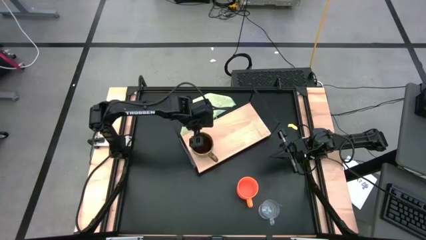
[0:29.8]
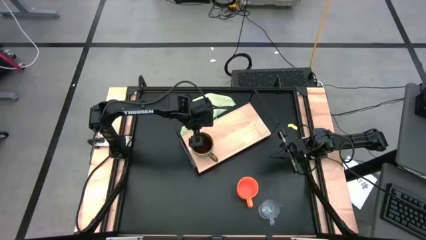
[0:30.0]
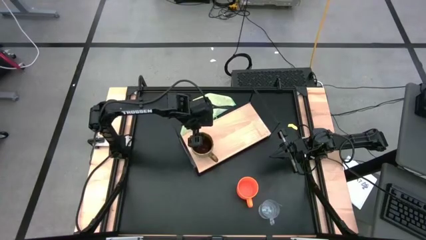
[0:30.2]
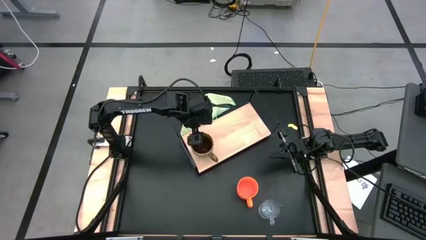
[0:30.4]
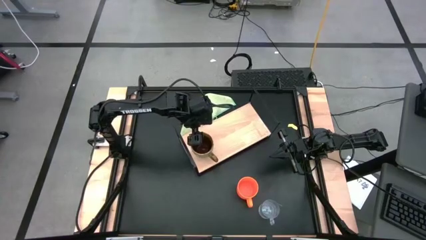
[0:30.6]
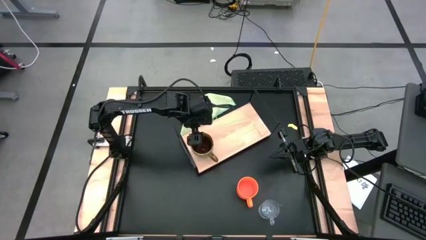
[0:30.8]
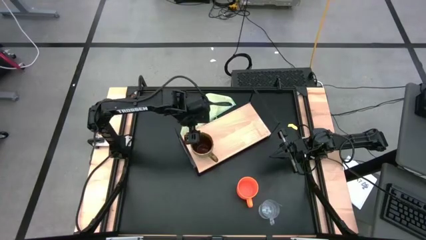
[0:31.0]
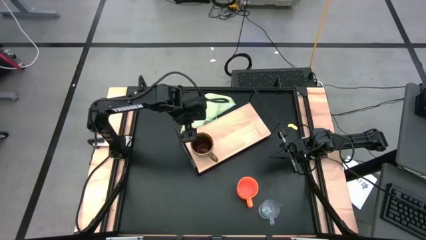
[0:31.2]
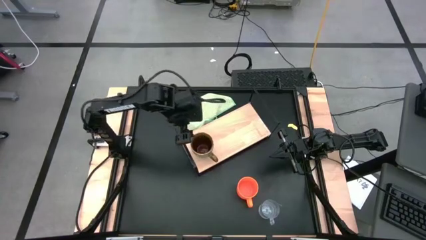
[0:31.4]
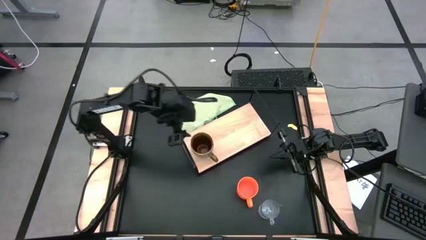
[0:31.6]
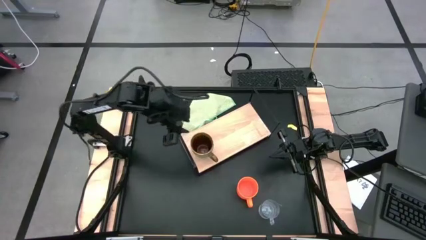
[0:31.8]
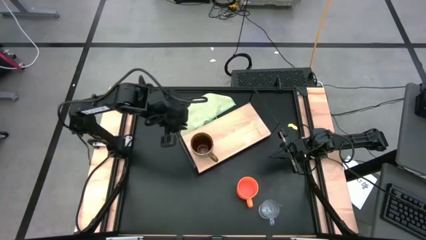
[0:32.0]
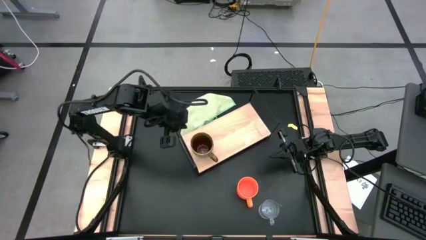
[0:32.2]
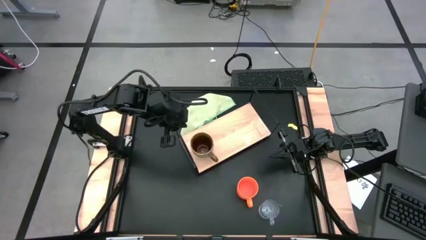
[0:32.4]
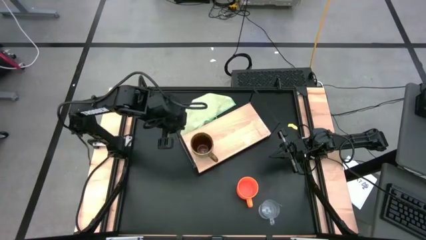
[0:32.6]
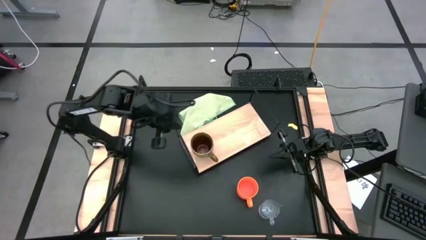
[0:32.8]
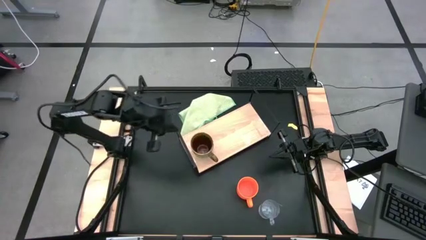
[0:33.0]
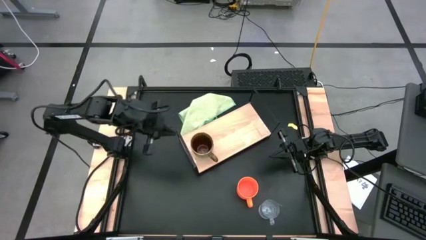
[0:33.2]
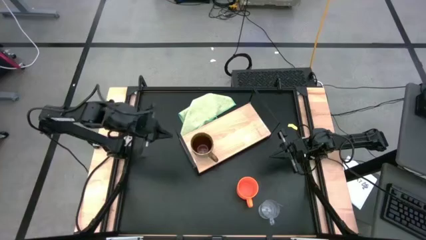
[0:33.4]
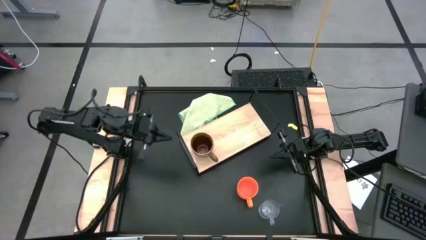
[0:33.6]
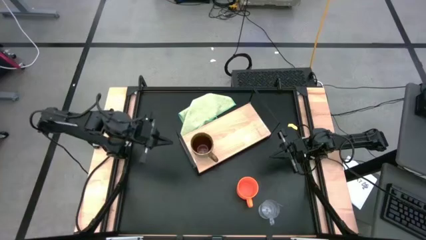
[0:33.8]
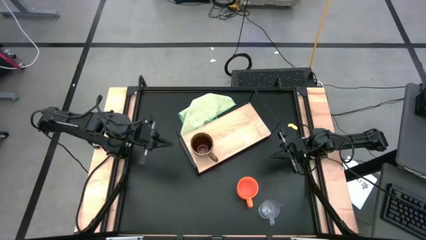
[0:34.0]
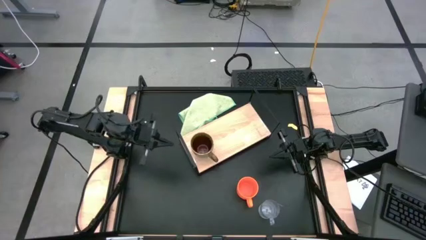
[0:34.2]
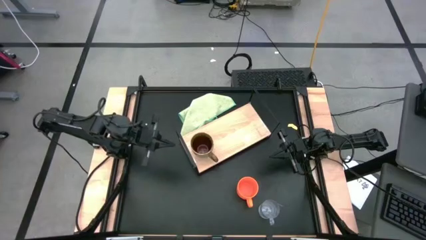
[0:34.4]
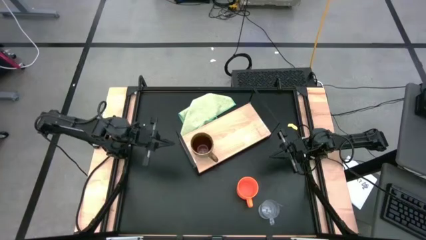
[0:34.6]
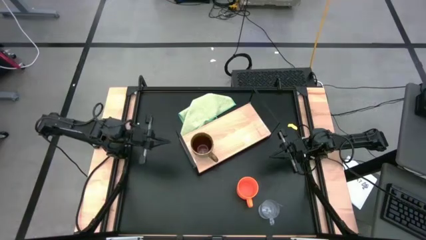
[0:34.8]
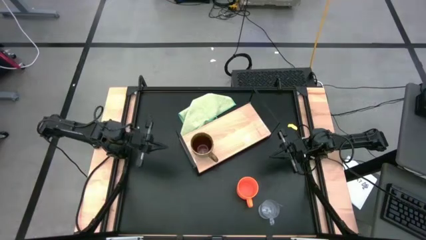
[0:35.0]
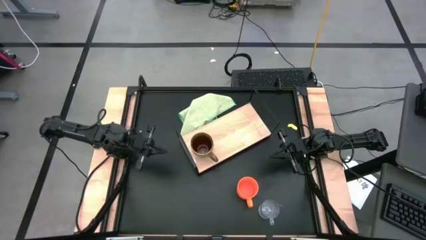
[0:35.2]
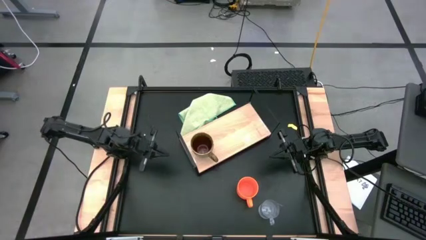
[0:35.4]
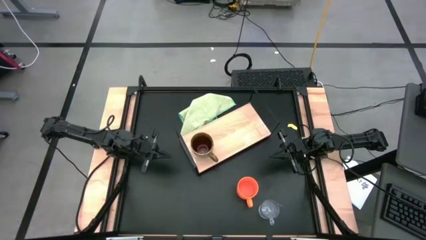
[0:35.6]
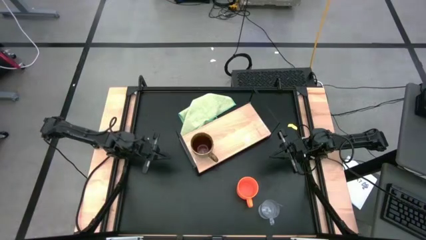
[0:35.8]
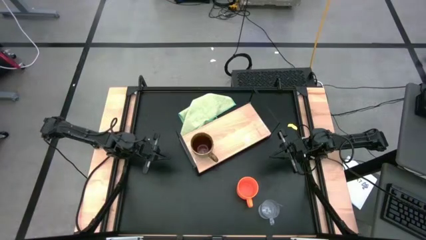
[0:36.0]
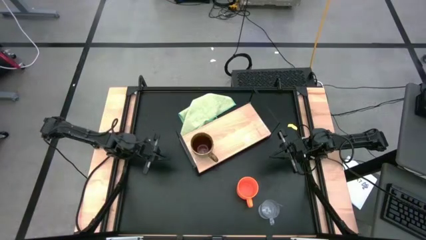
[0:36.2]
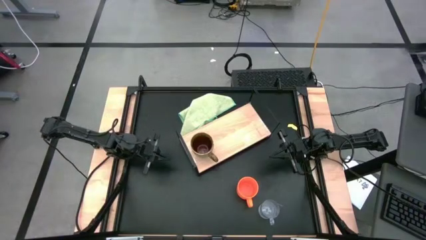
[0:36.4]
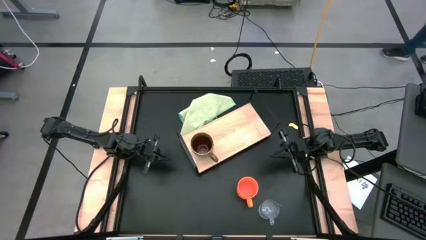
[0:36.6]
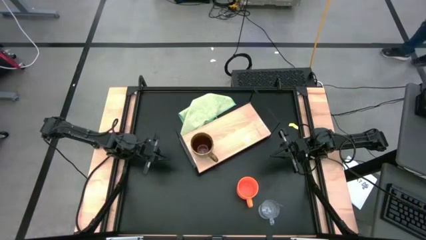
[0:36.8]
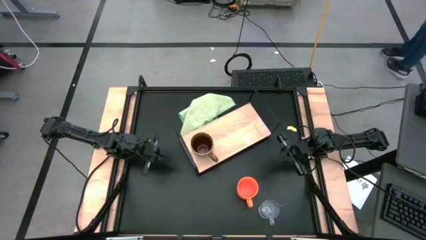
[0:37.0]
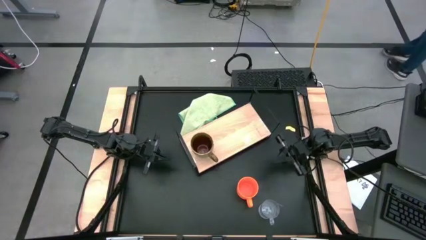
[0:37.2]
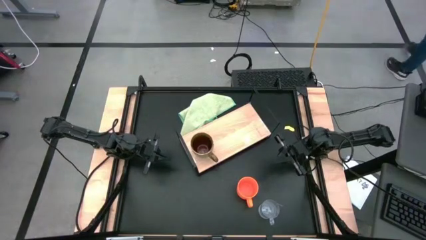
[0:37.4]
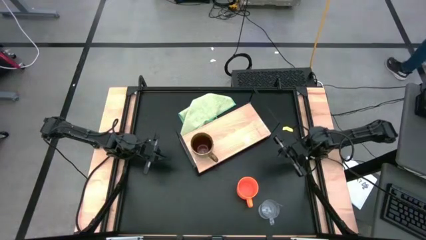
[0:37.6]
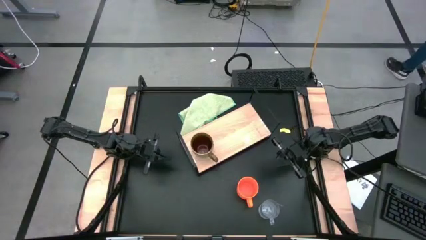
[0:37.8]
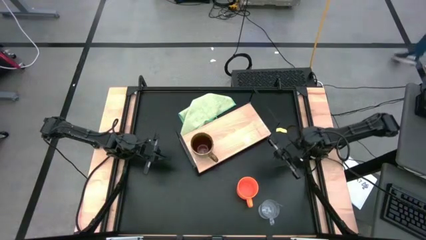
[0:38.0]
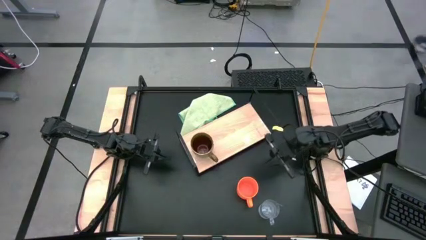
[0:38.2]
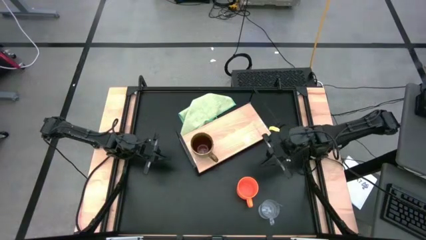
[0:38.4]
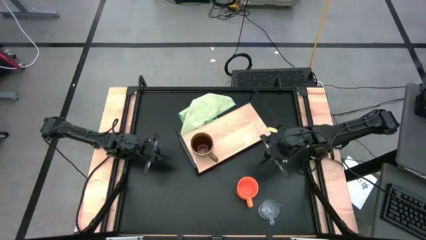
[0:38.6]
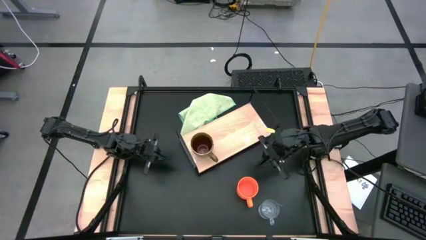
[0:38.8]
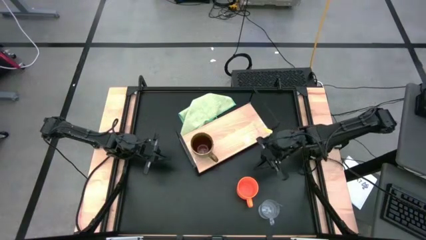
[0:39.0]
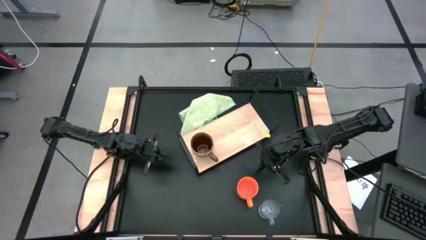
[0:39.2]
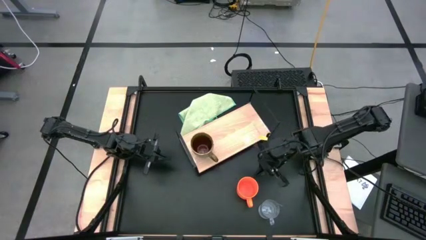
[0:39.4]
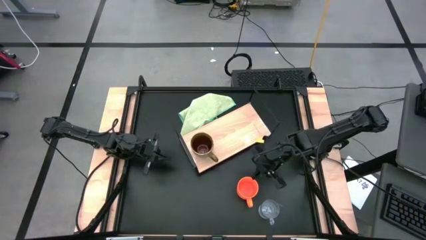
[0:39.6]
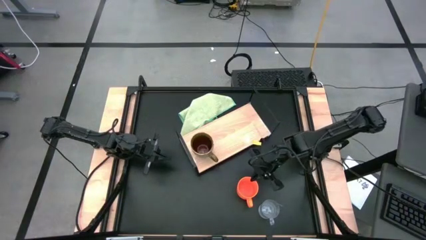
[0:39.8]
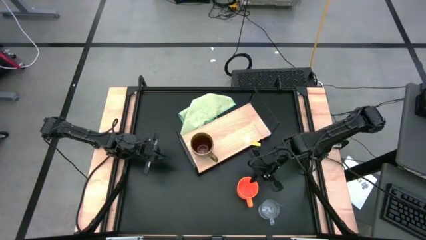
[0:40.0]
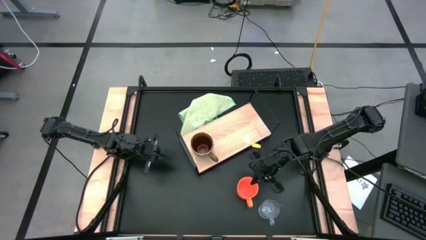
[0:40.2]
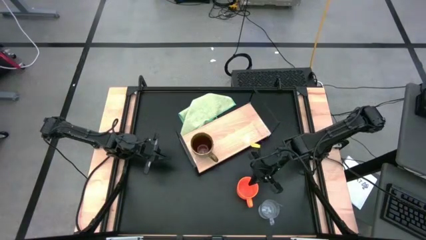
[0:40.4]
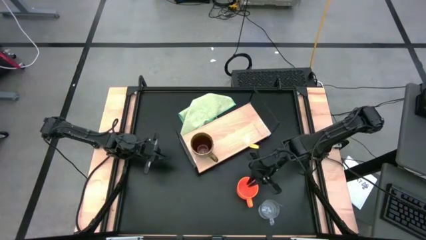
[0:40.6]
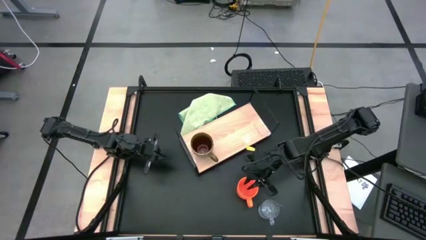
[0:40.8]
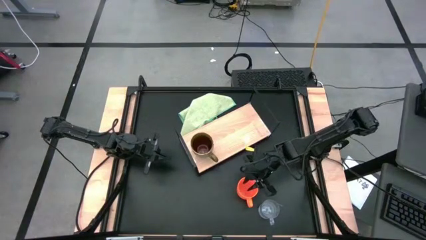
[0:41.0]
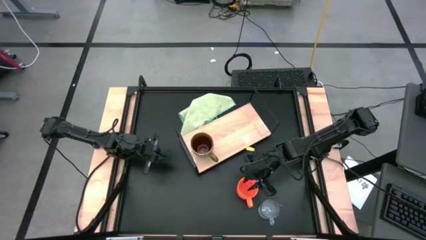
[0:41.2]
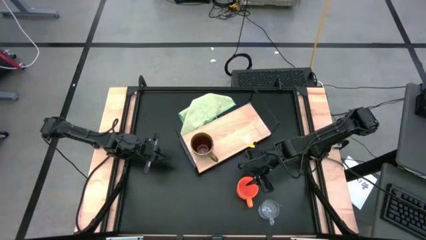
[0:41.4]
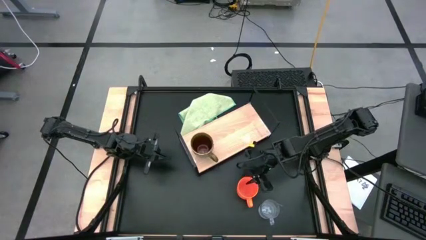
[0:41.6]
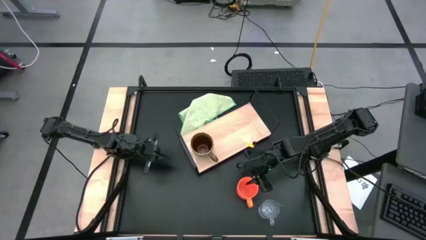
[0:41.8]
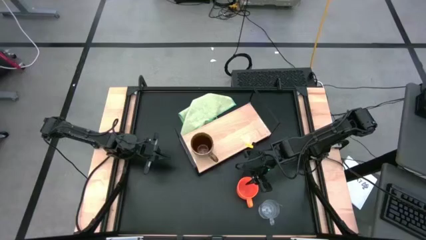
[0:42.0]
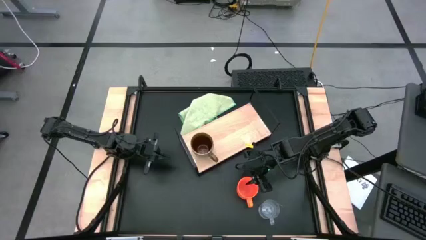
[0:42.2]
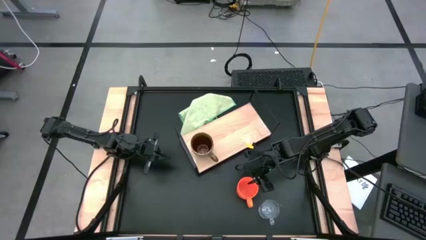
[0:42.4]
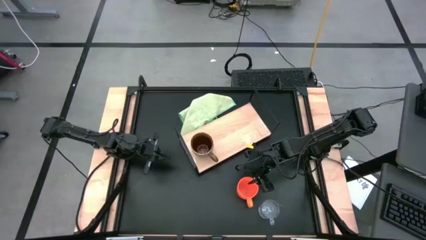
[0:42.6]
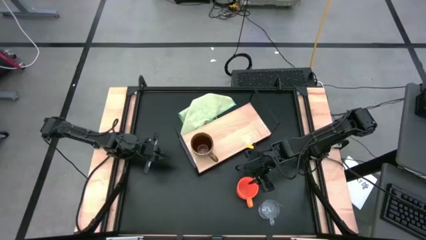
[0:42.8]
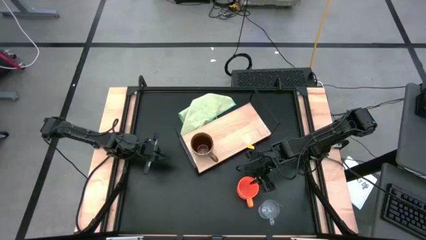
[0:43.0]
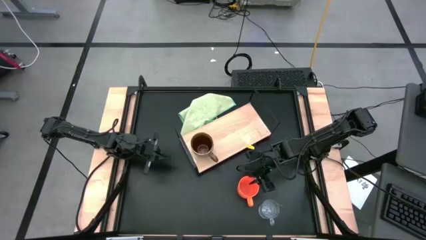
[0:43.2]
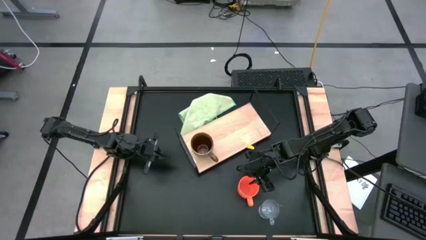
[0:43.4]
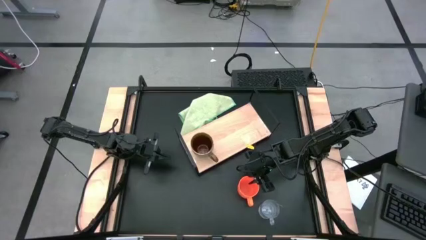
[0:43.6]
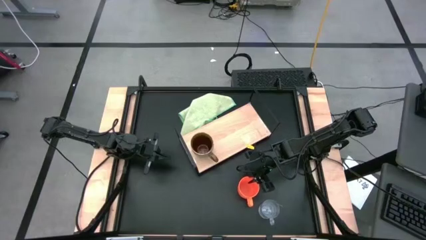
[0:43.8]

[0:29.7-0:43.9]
Task: Stack small to large cups/mugs on shelf
Put the orange mug on the shelf

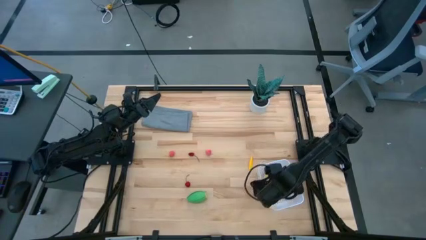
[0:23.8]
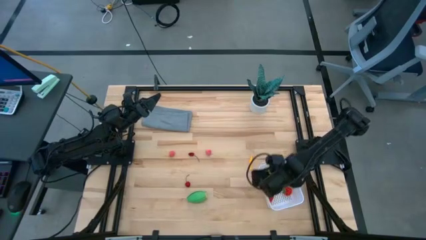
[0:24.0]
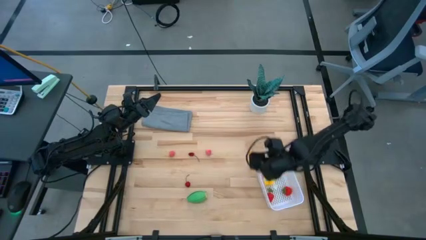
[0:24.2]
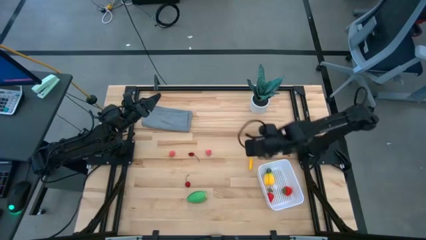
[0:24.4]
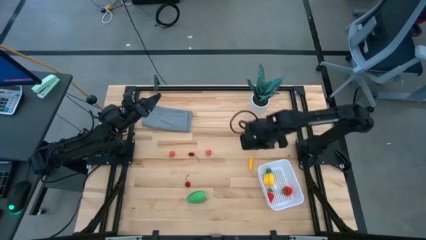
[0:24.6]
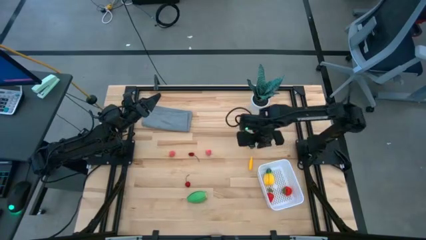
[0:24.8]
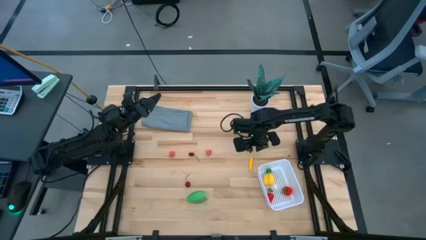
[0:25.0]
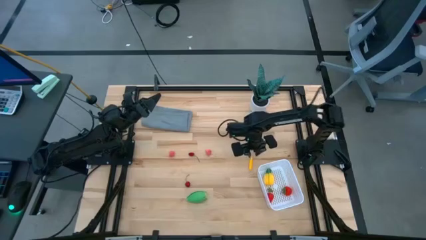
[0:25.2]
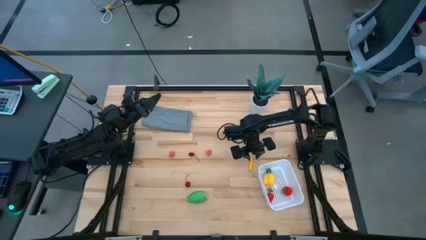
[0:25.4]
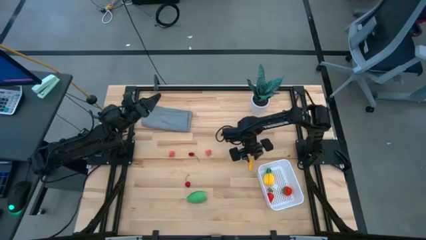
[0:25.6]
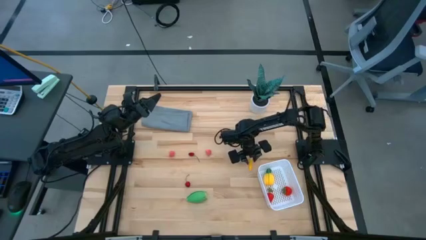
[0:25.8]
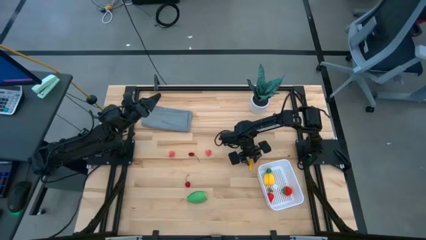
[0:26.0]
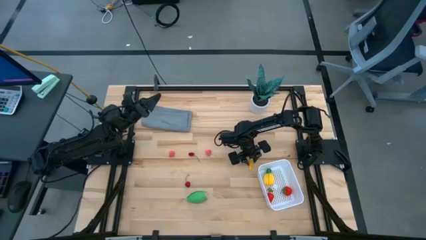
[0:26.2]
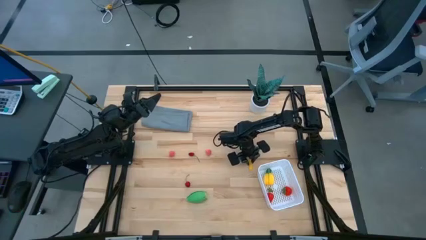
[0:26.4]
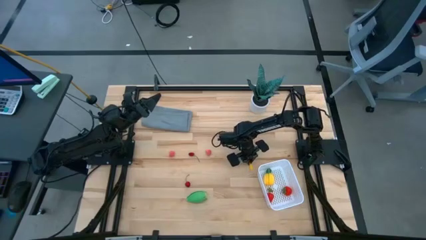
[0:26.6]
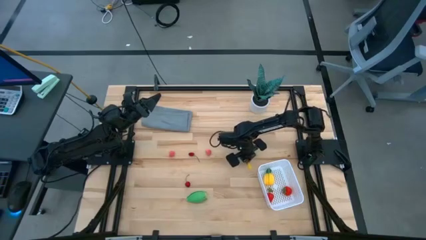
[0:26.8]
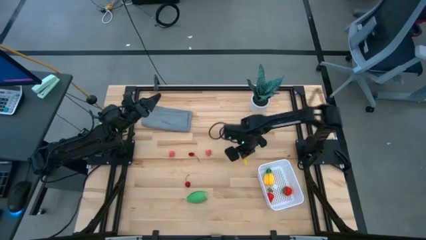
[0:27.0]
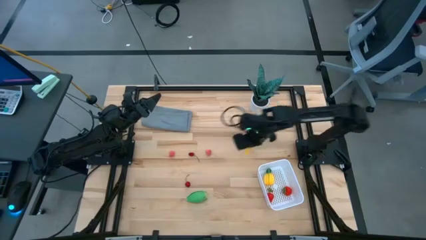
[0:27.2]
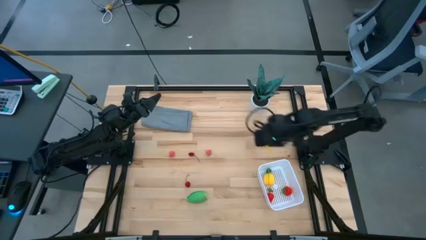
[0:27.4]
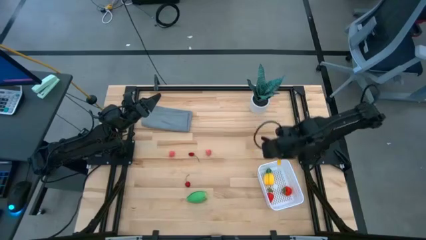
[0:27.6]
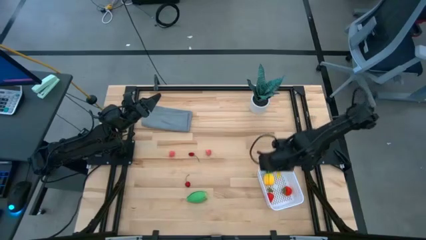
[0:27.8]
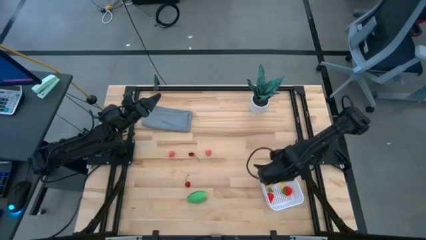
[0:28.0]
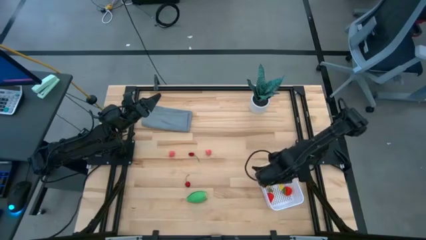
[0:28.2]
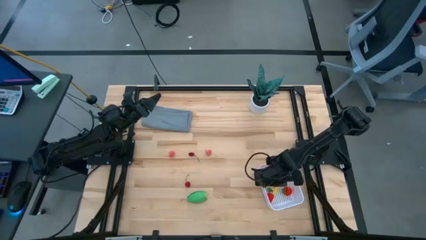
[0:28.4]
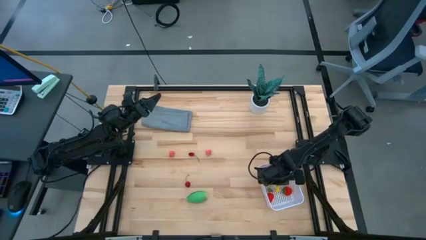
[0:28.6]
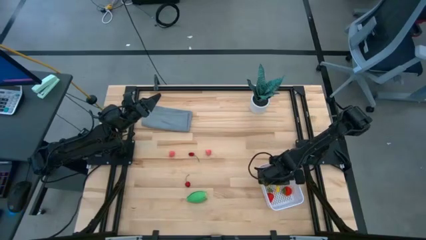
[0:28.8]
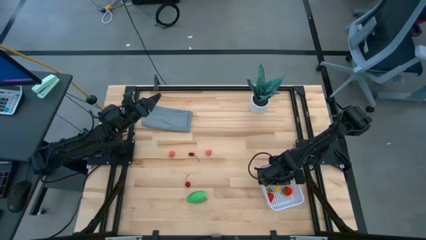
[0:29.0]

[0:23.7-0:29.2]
Task: Pick and placing Produce into tupperware
Put the yellow corn into the white bin
